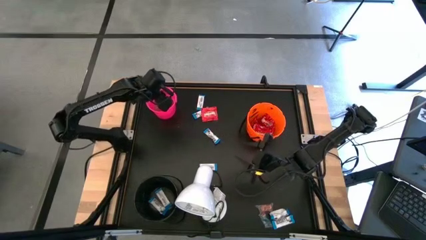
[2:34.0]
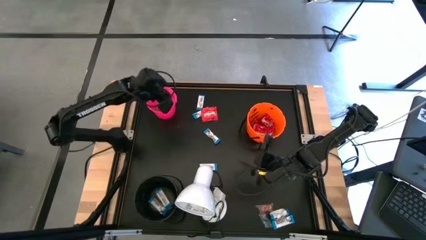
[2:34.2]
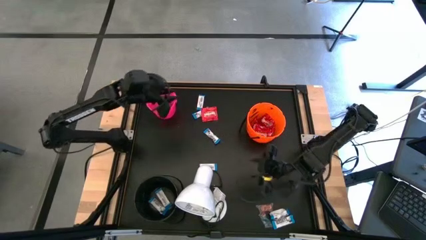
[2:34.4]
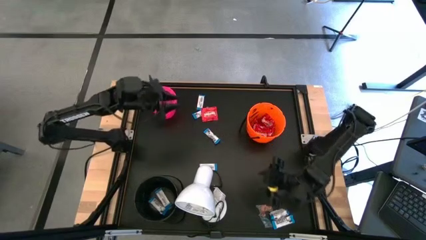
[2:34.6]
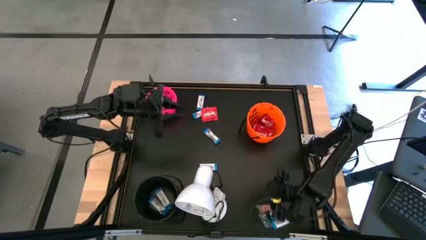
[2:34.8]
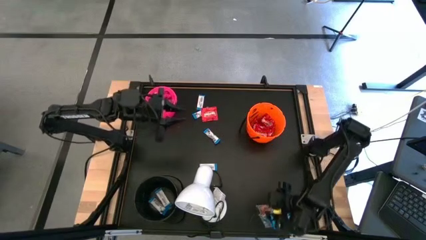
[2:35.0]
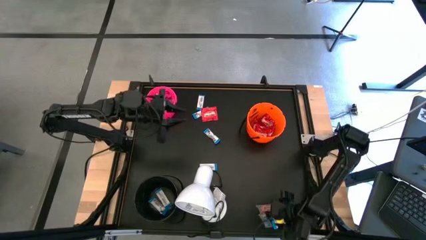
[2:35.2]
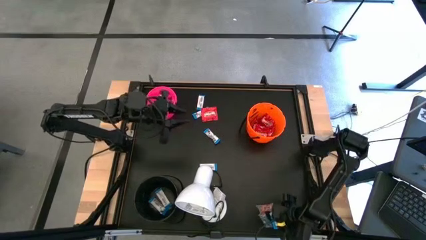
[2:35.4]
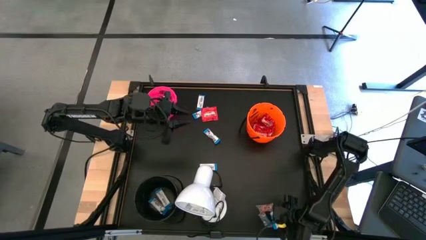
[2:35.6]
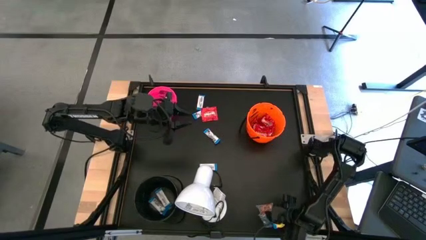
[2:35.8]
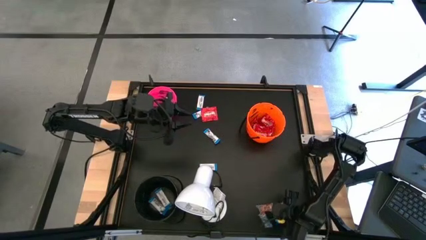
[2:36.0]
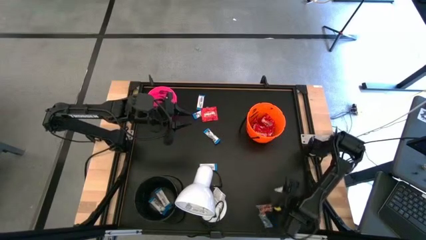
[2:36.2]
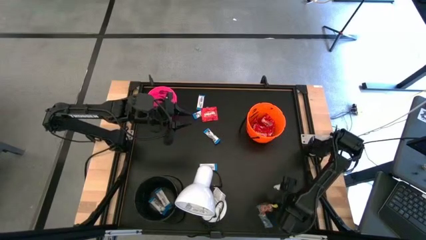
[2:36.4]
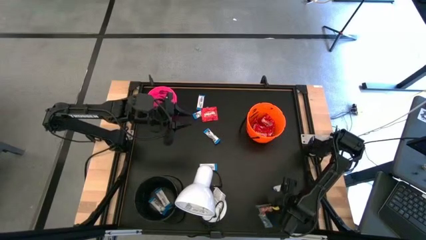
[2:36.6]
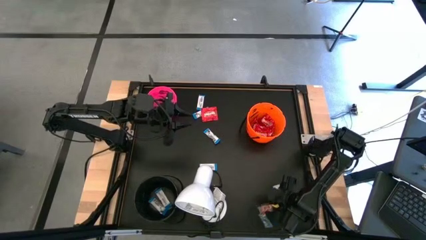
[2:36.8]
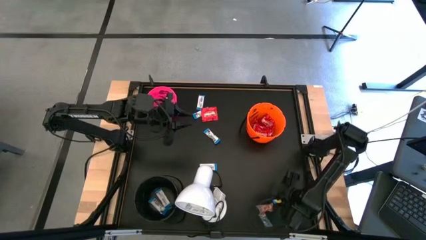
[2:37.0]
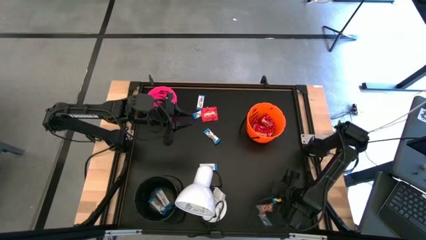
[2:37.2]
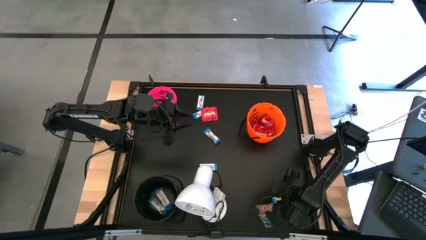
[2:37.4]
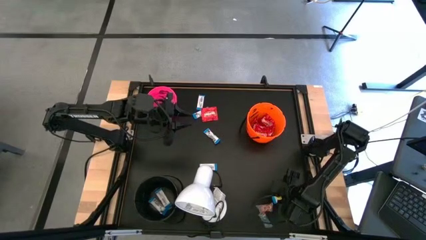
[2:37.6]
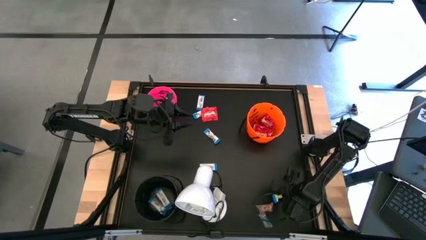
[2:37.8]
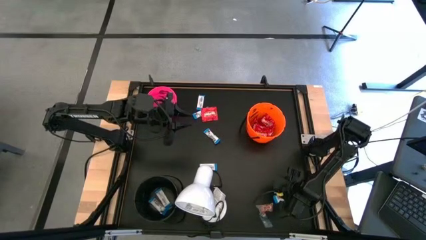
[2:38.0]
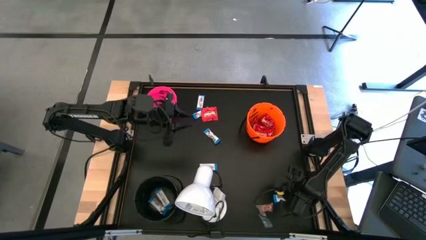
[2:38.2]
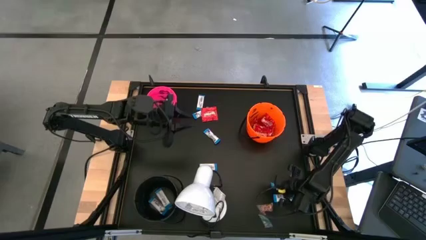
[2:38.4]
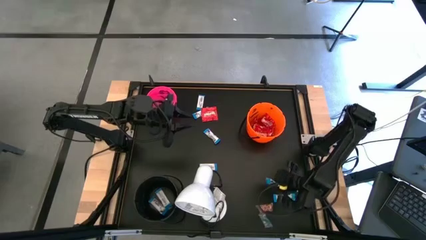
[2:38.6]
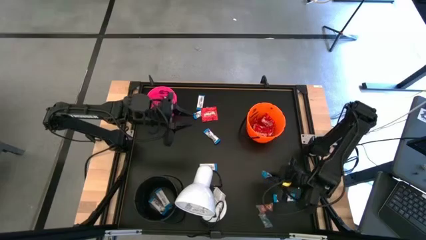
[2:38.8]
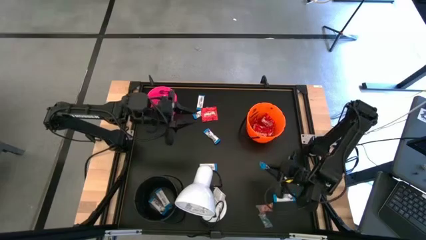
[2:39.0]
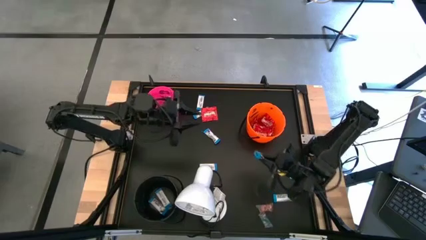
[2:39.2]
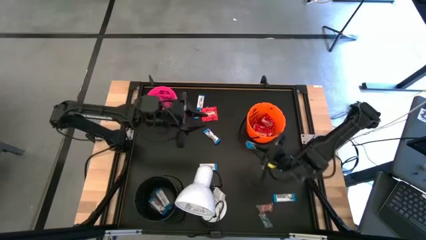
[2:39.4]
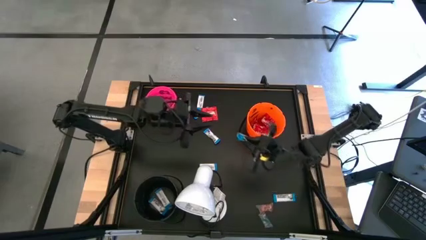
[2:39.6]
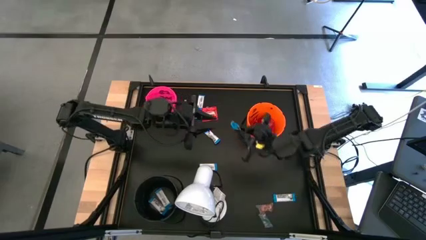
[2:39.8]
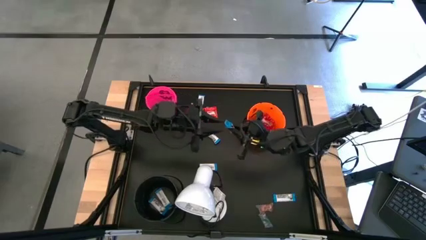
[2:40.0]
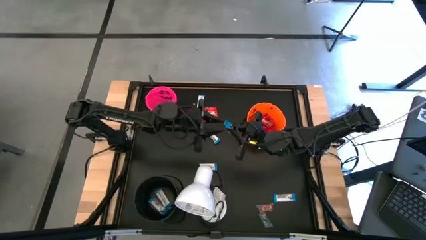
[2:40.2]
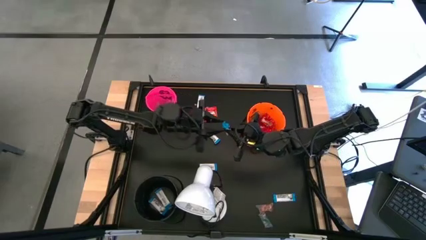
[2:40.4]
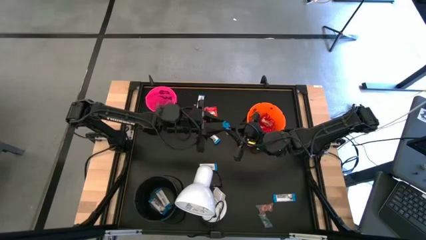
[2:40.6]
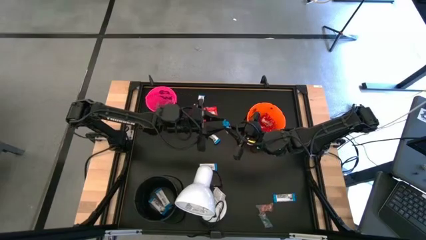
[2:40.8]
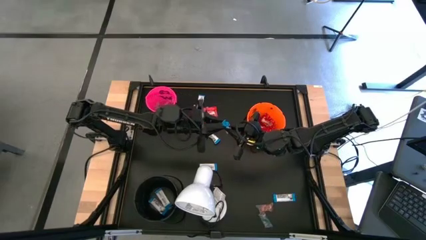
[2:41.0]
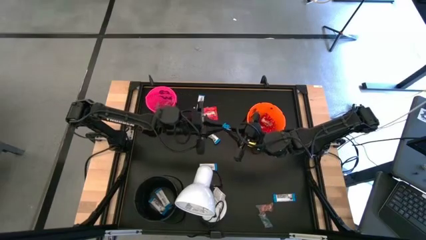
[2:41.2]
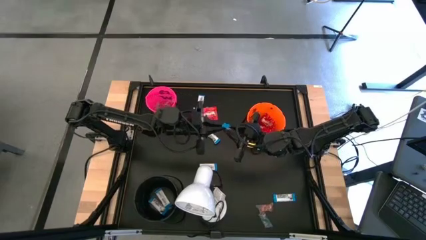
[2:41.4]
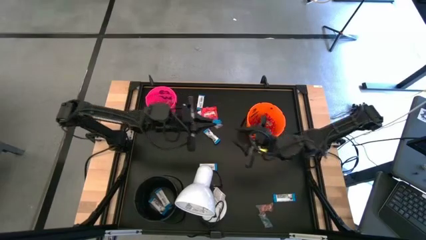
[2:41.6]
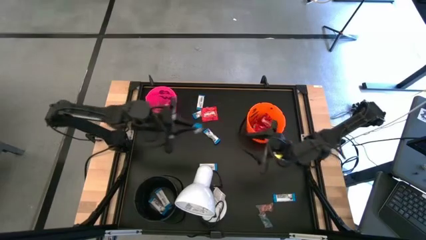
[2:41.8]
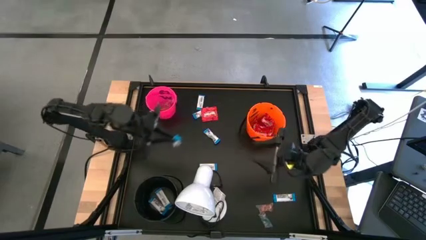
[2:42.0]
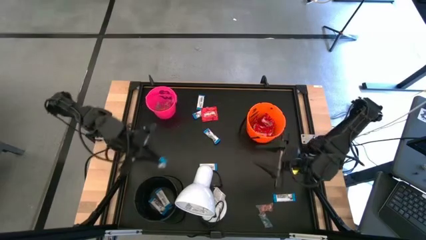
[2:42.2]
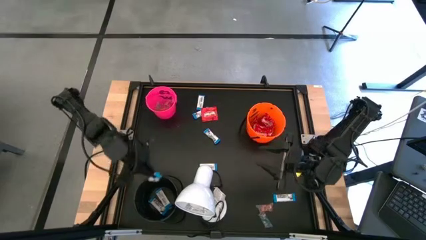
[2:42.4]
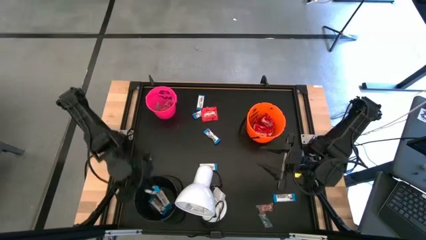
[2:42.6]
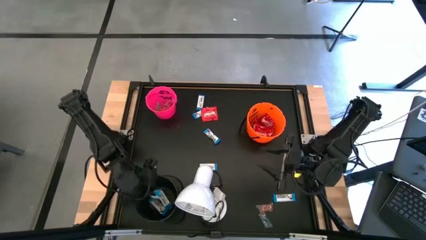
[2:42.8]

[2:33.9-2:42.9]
Task: Sort candy
Put the white chocolate into the black bucket

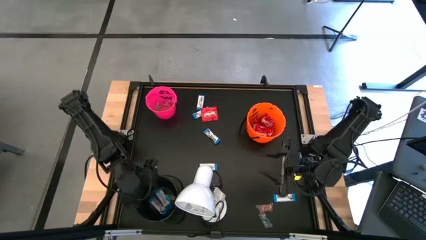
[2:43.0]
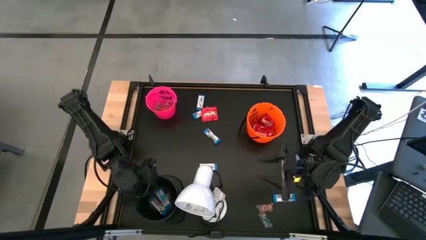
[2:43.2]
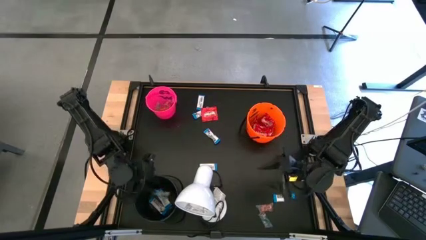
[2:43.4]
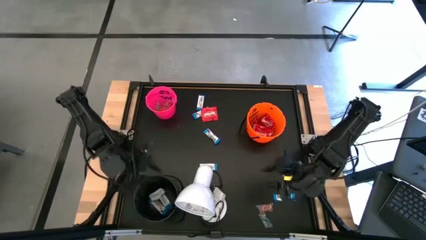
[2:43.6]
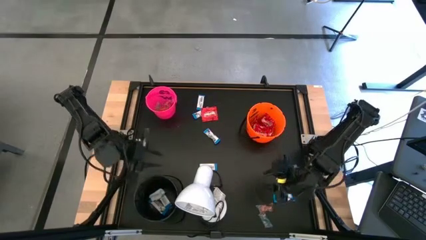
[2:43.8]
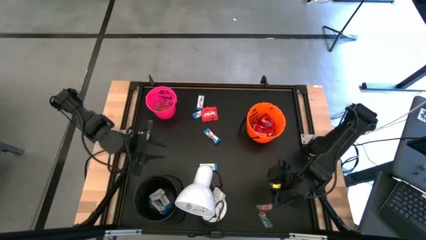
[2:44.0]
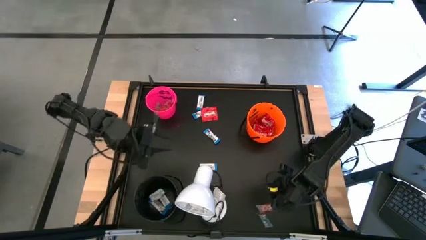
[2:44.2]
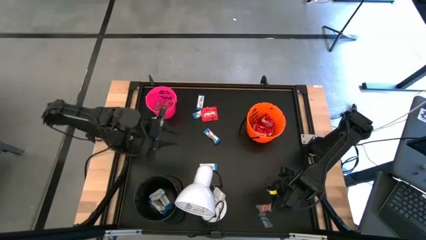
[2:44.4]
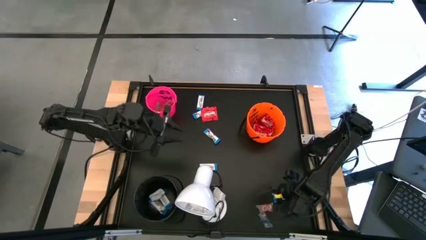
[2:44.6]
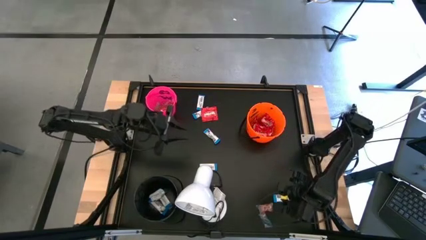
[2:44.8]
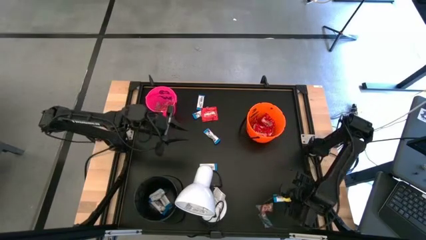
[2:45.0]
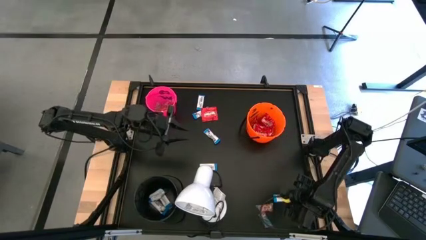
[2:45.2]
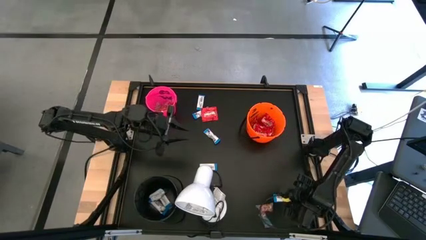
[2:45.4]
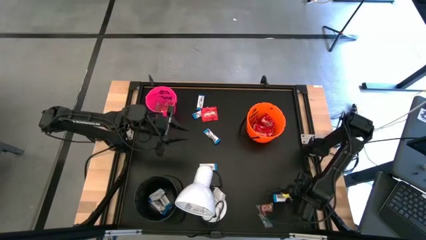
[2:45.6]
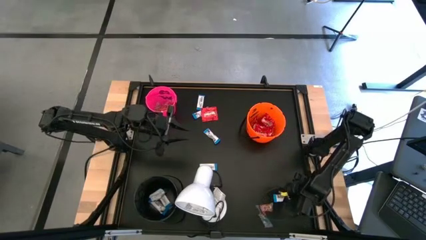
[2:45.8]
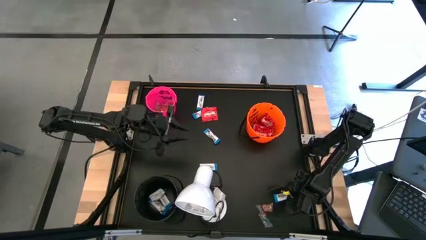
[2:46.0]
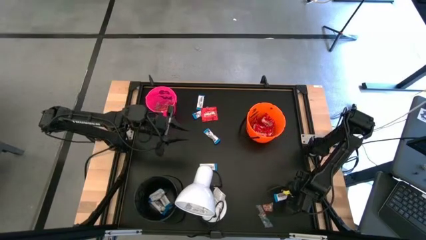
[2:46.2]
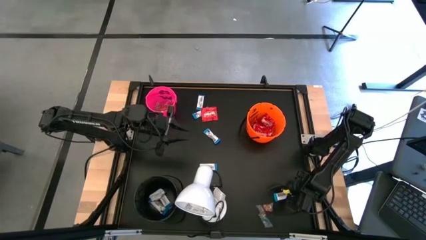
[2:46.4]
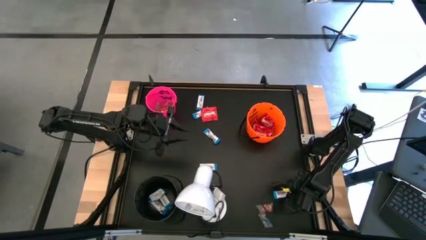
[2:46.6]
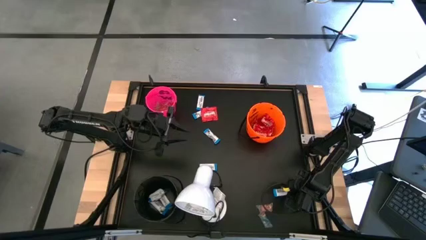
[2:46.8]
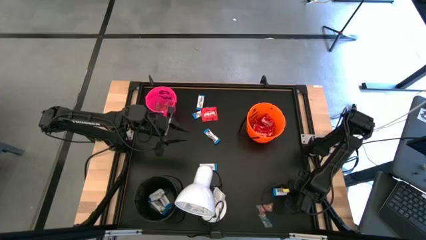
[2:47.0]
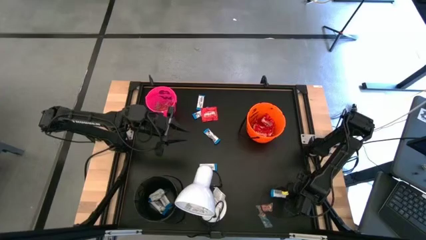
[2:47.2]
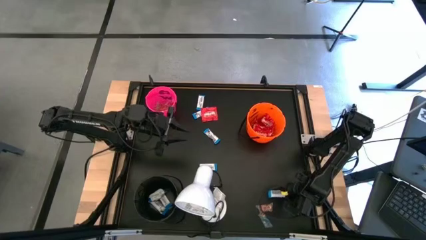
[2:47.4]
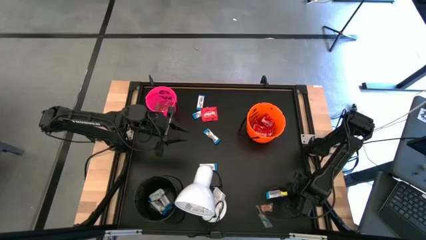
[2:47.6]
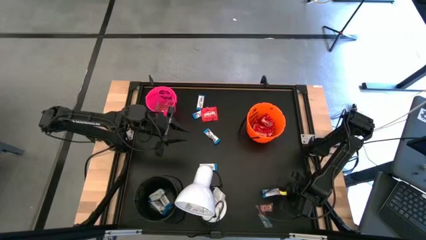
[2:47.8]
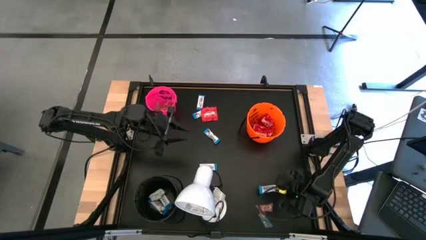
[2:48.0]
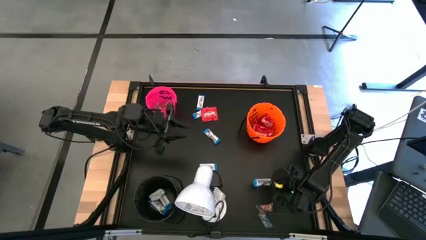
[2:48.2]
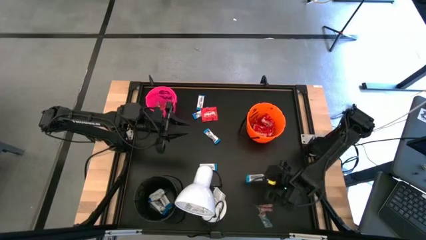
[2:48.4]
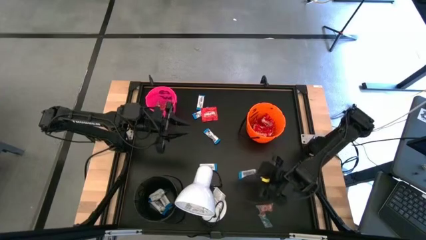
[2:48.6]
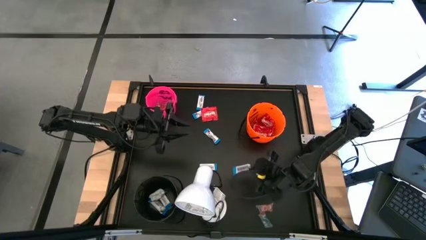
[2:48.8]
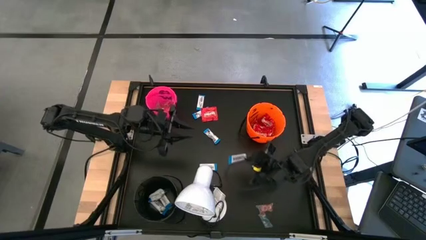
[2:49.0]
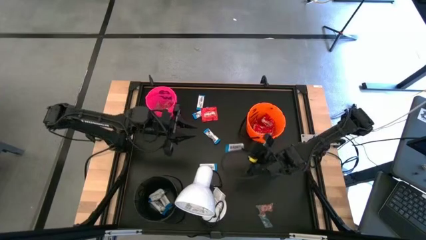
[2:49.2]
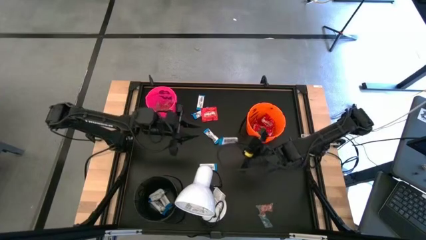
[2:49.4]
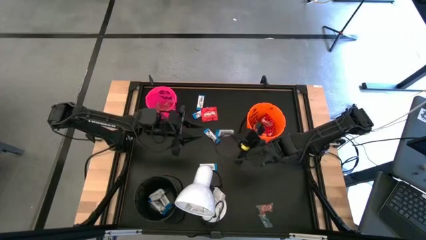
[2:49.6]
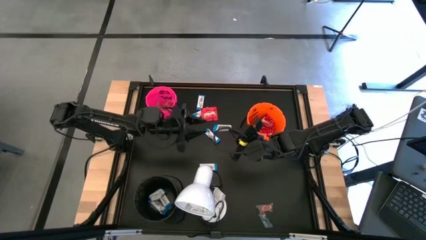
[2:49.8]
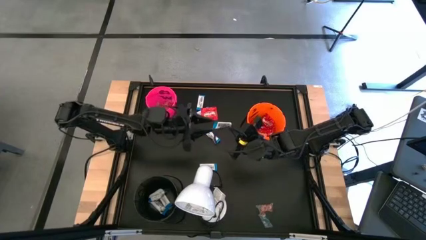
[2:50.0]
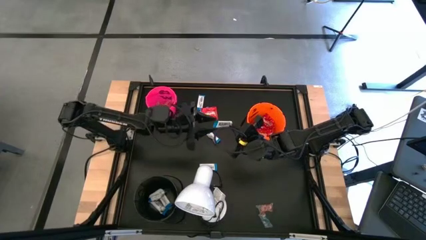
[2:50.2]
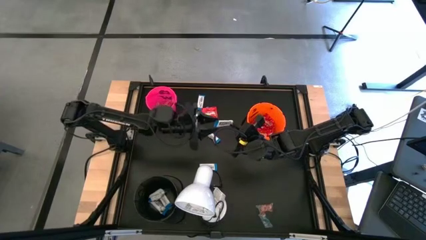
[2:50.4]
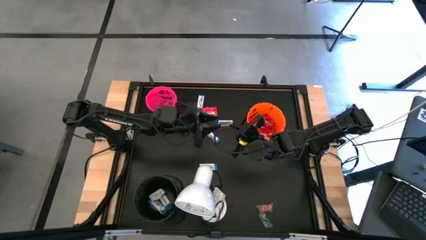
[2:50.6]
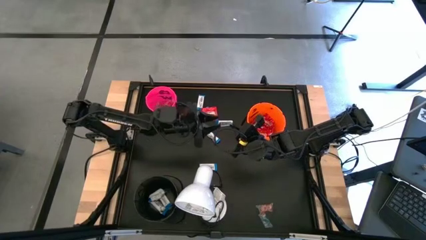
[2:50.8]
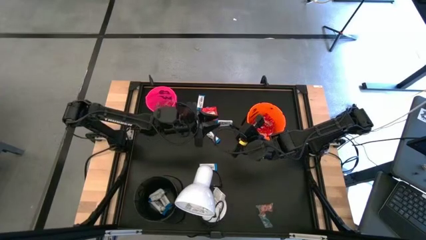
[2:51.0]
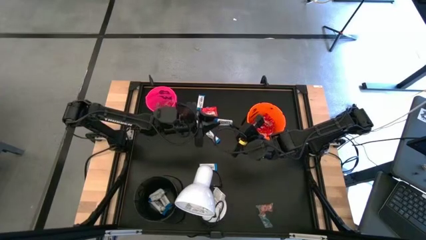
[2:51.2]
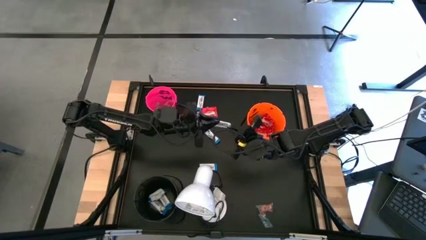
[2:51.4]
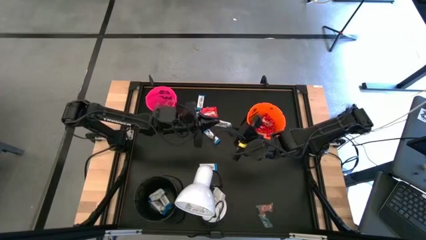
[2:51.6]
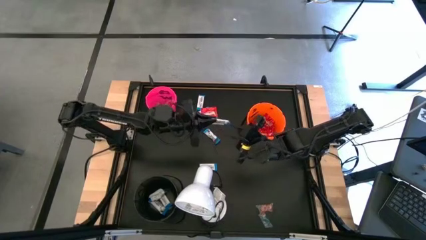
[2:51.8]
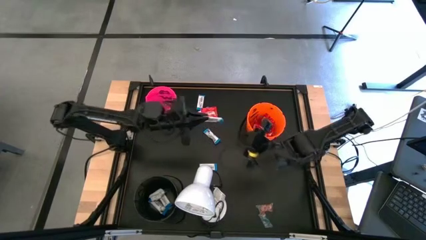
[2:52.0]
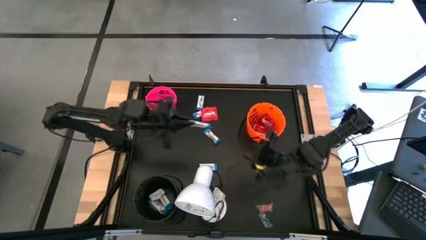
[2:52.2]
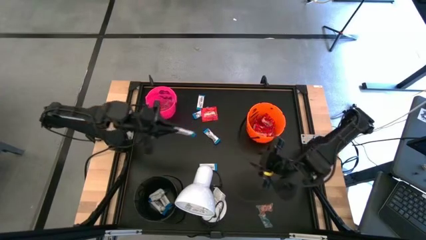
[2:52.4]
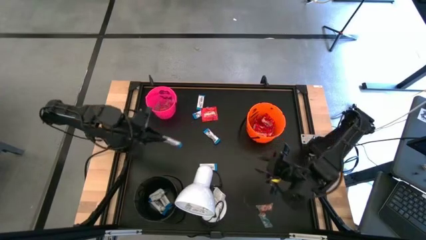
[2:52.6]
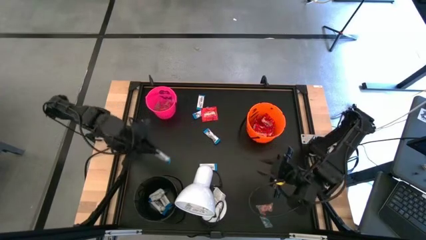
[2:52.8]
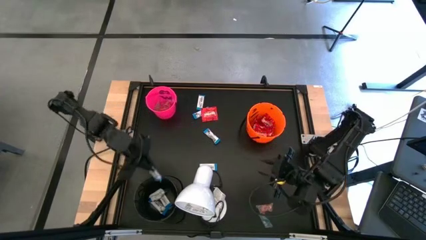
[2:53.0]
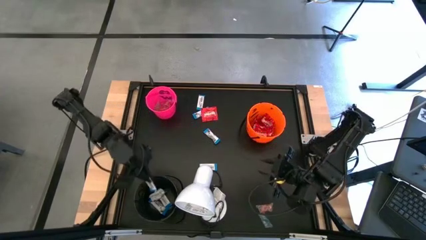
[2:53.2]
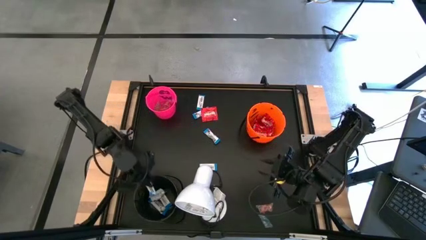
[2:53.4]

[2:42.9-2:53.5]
Put the white chocolate into the black bucket
